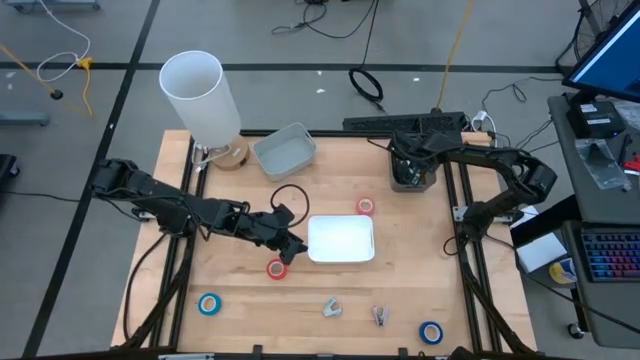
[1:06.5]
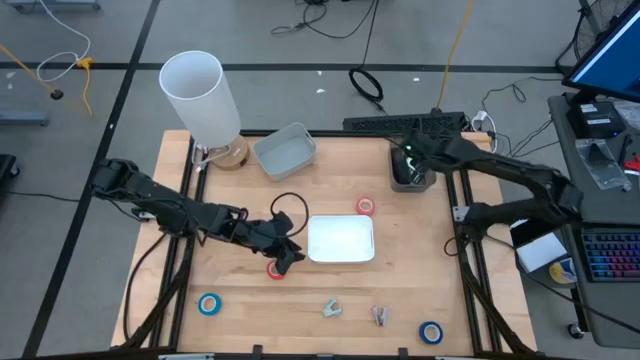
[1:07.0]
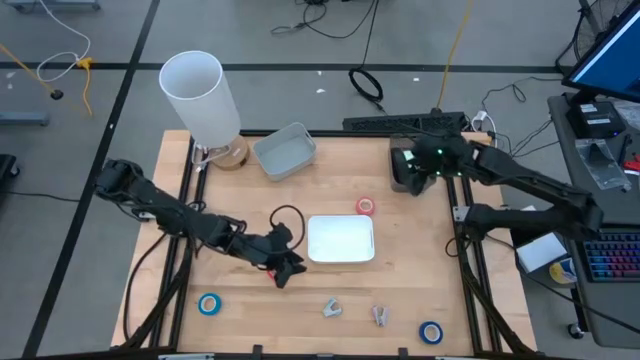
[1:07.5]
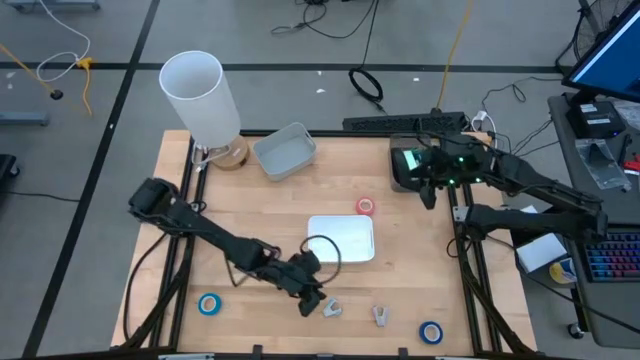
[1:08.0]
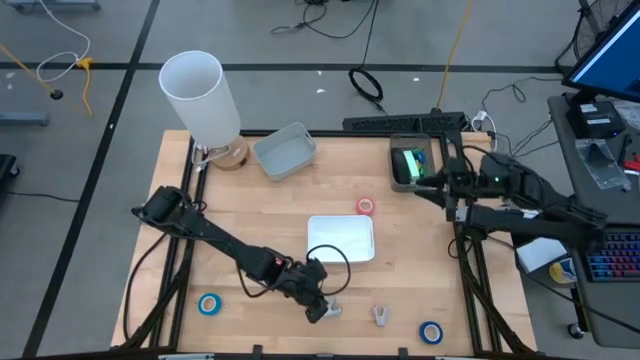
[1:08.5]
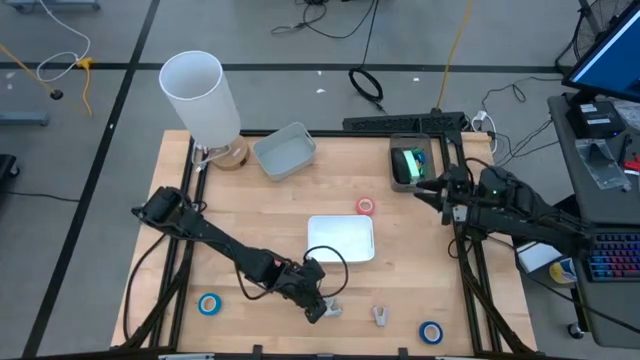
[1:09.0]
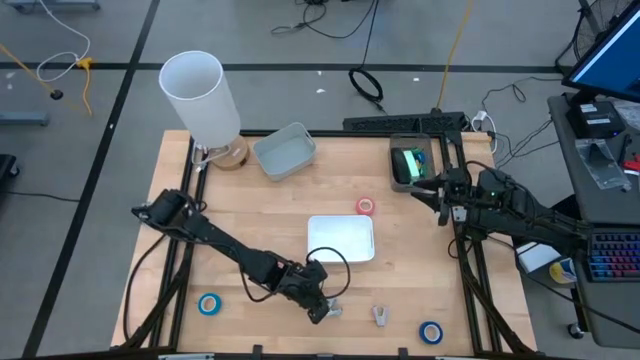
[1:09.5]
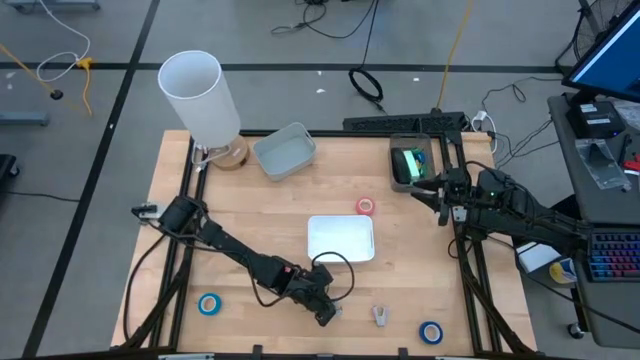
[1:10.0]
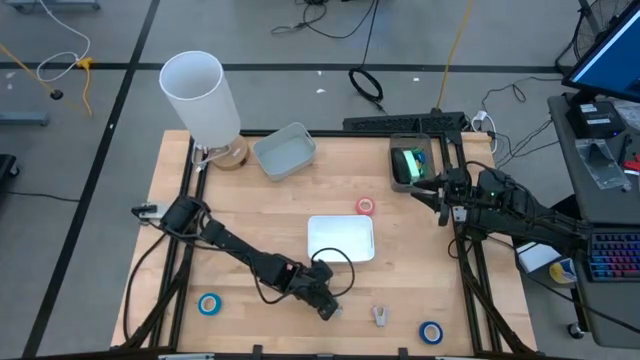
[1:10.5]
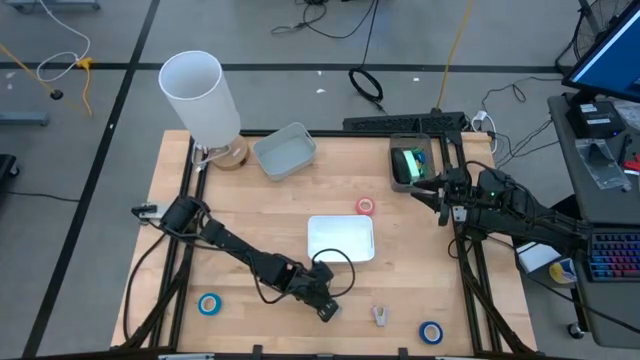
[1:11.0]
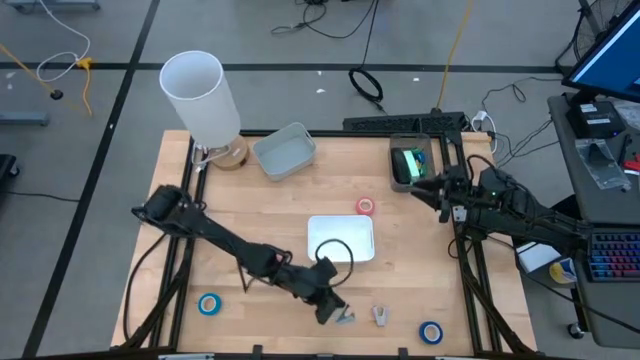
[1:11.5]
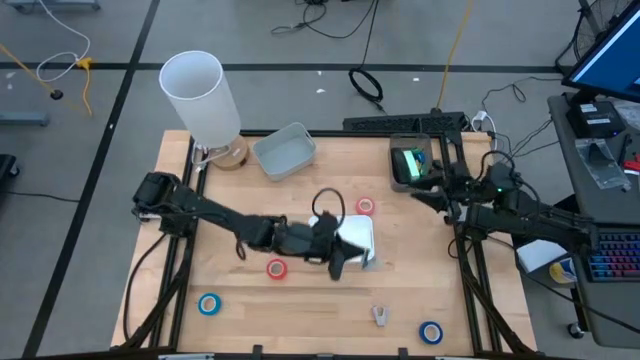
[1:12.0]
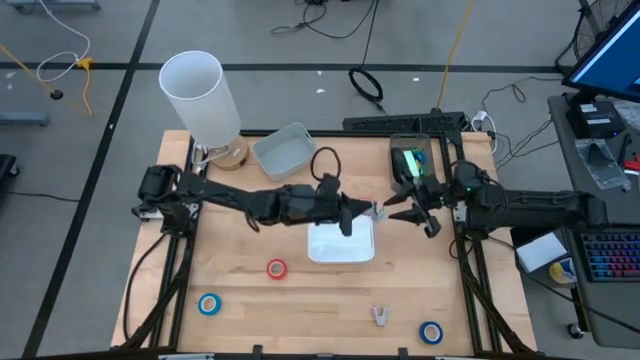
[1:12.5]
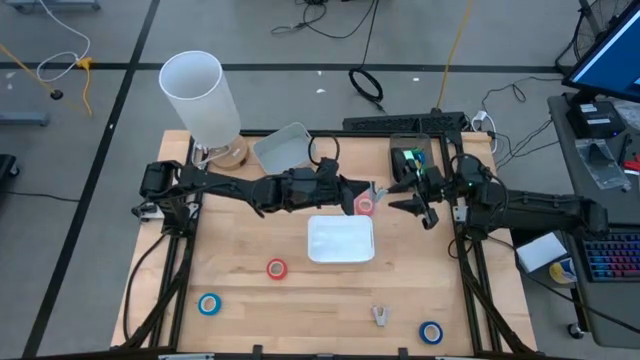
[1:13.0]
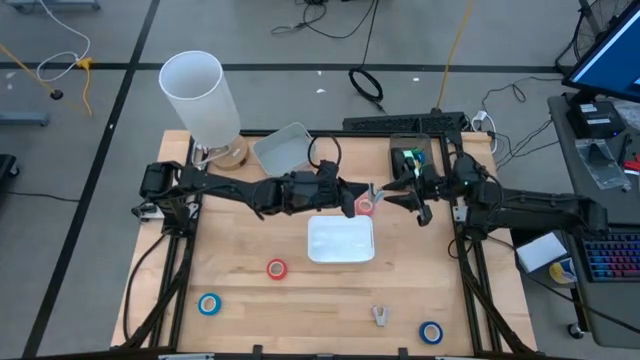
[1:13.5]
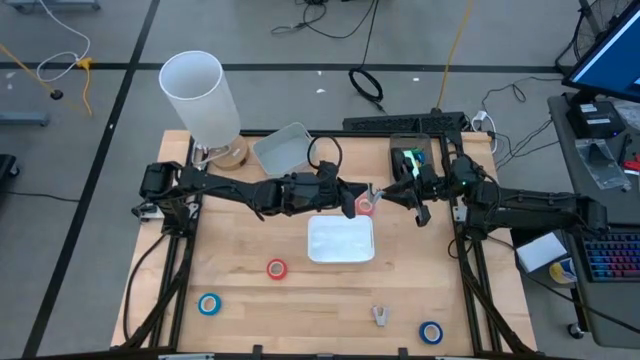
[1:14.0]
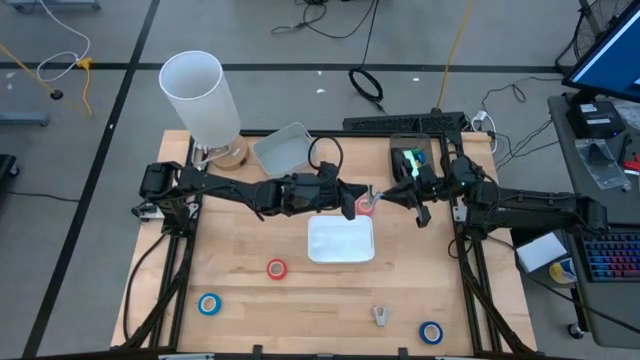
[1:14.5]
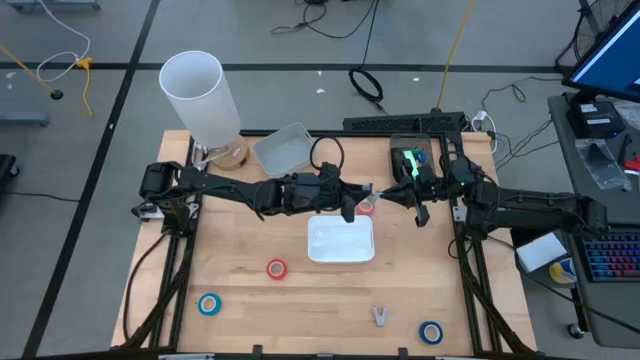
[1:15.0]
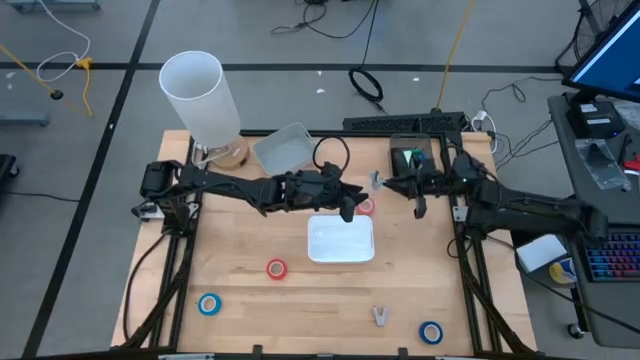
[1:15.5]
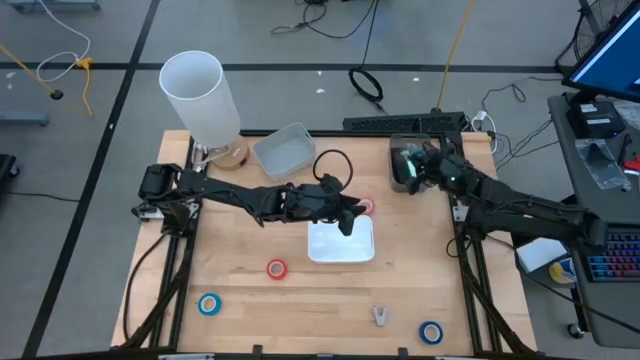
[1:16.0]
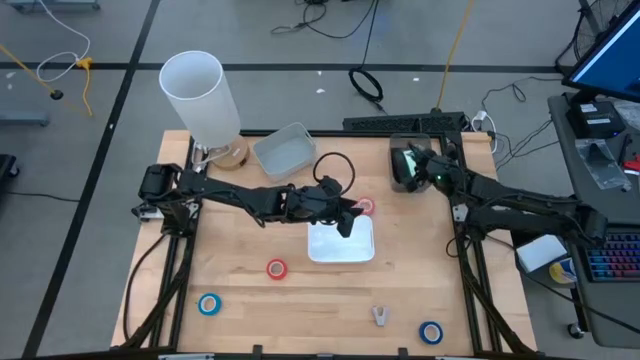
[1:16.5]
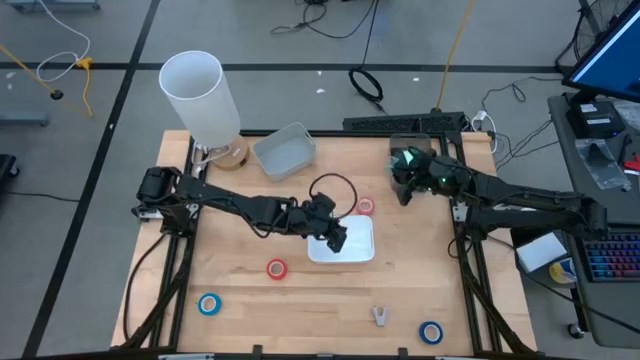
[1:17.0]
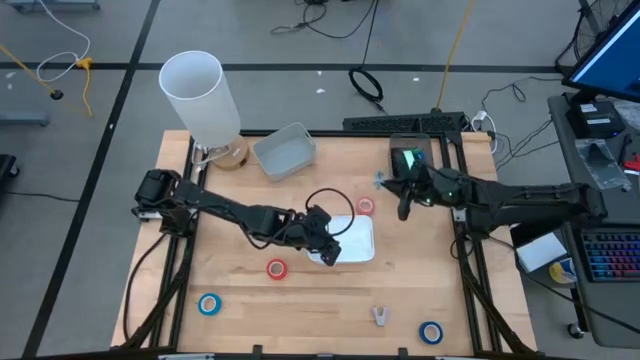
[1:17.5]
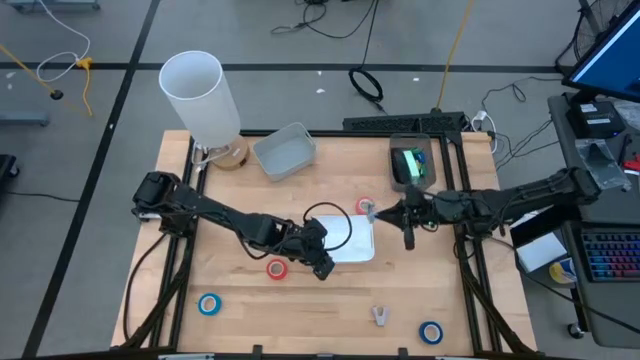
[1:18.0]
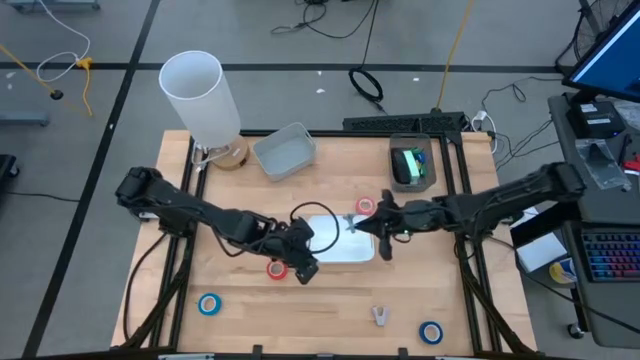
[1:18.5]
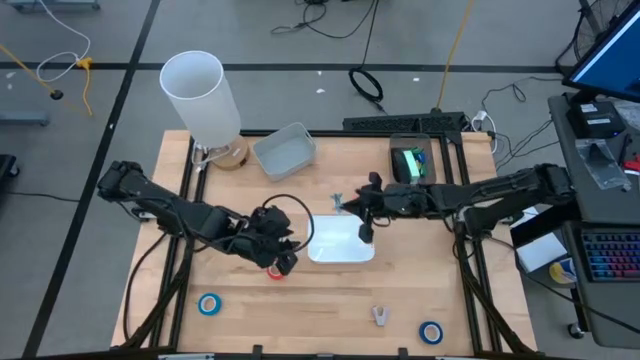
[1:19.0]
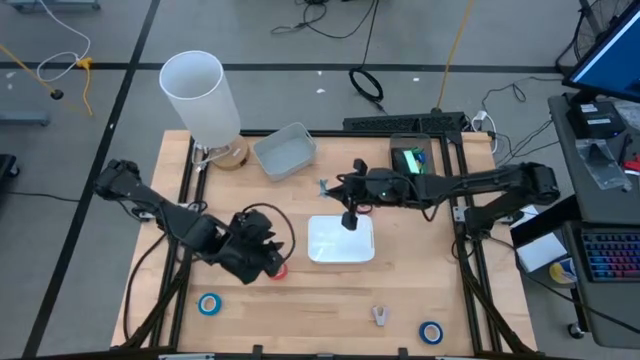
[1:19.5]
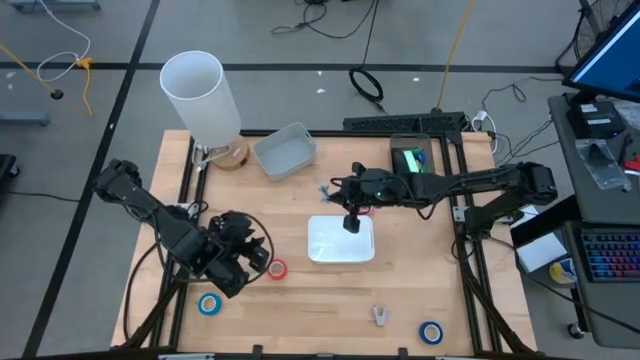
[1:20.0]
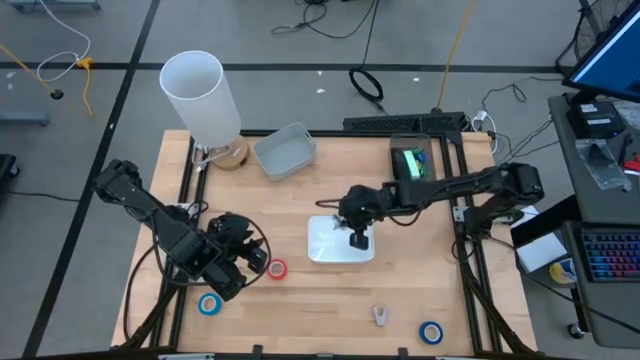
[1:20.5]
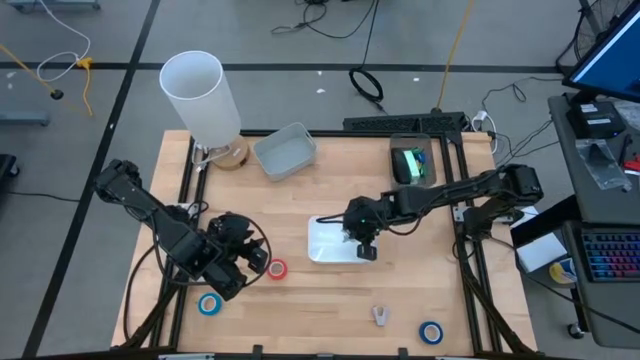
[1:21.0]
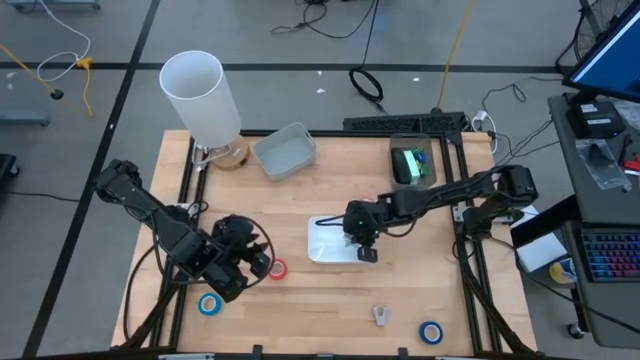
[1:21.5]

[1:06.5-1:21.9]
Task: Pick and place Stapler, Stapler remover, tape
Put the blue staple remover into the white bin

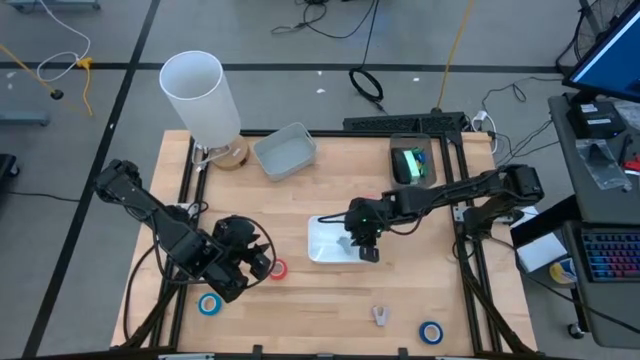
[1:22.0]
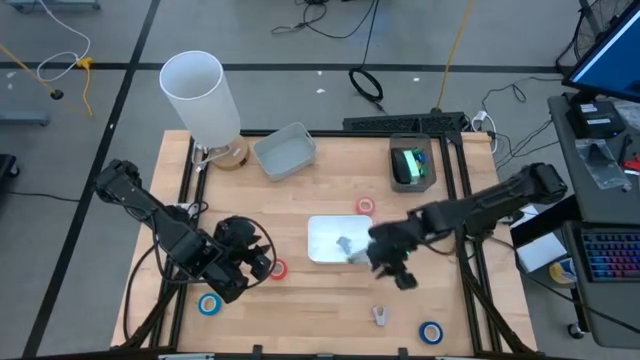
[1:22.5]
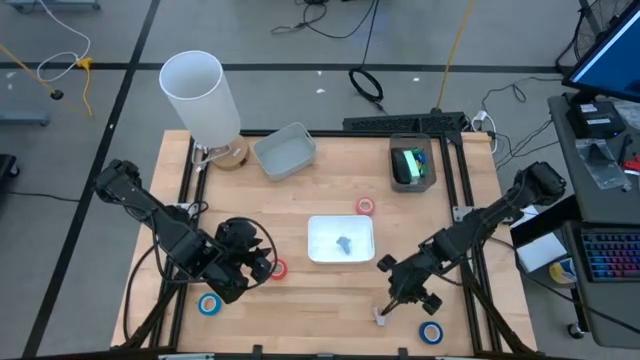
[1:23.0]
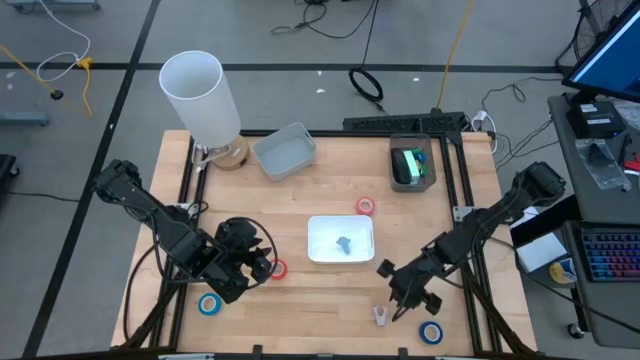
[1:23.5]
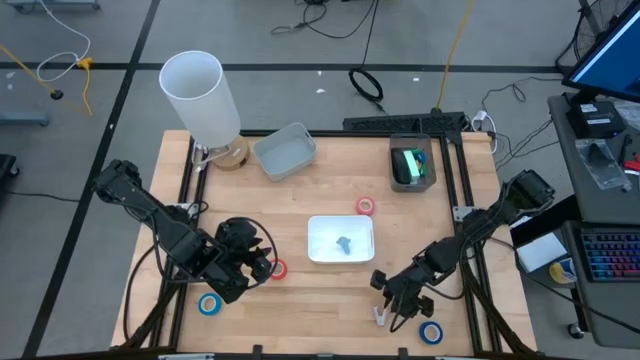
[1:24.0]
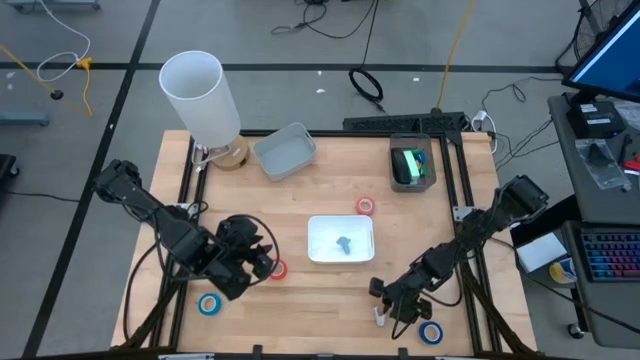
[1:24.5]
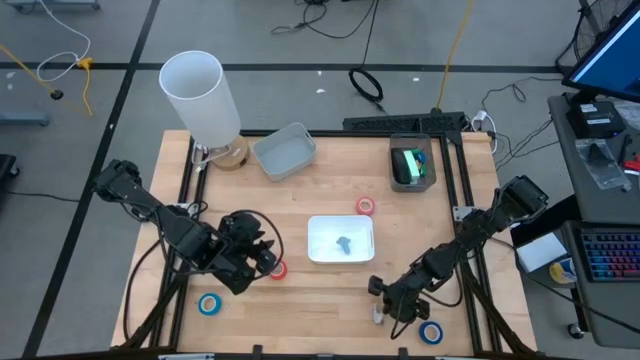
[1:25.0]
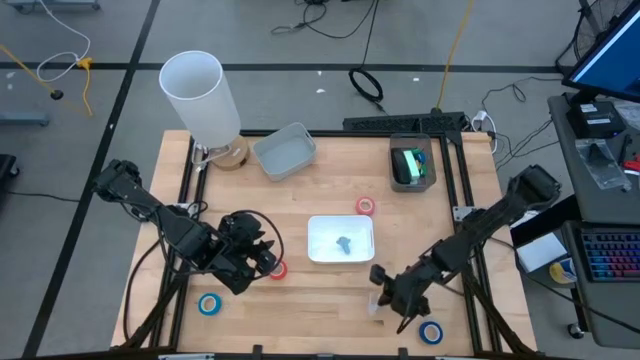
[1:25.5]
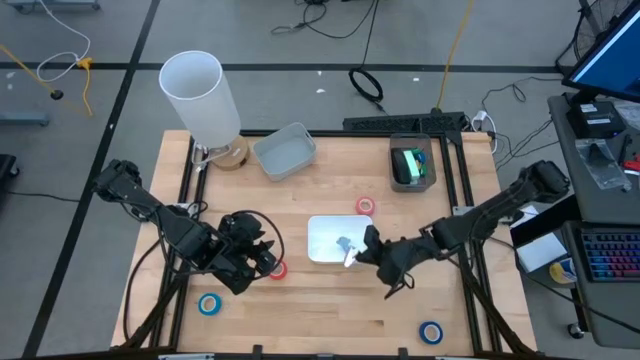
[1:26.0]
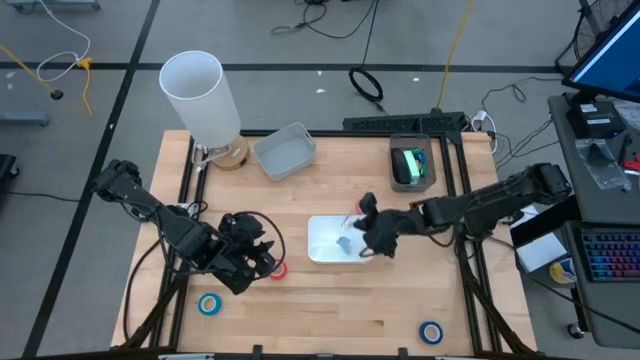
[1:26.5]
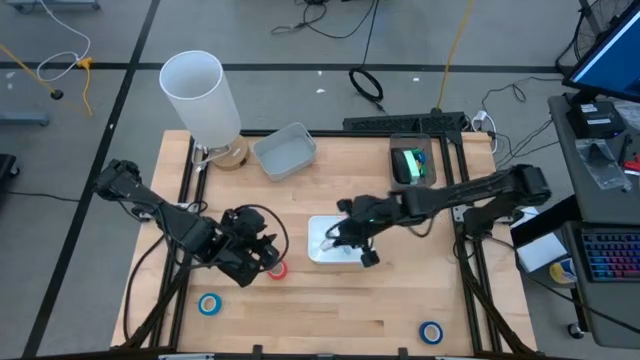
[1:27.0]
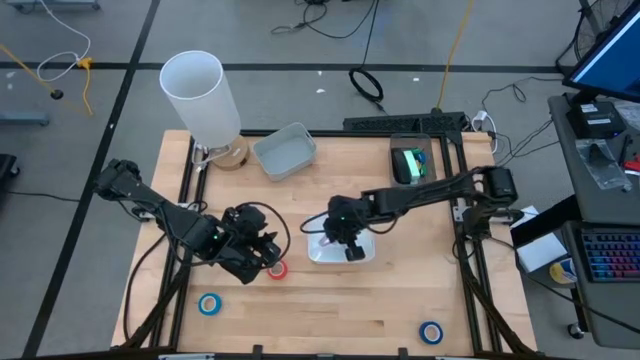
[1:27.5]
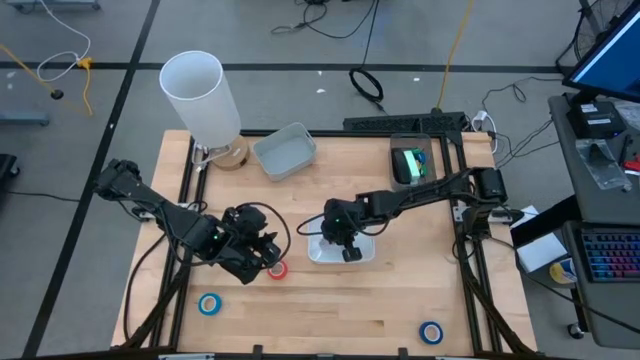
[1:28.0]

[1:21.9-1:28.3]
Put the purple staple remover into the white bin
